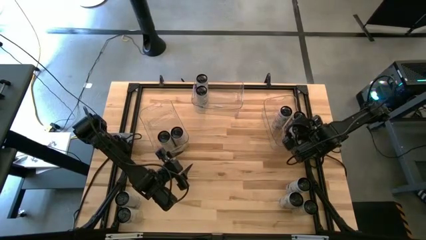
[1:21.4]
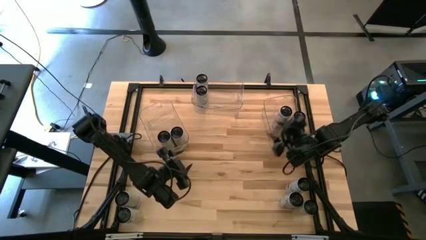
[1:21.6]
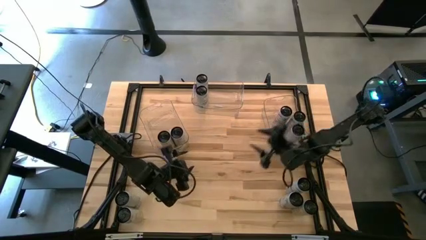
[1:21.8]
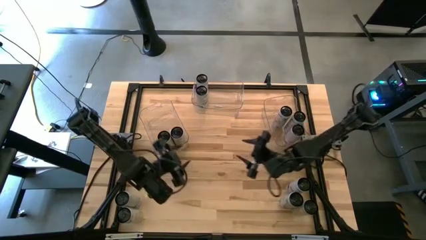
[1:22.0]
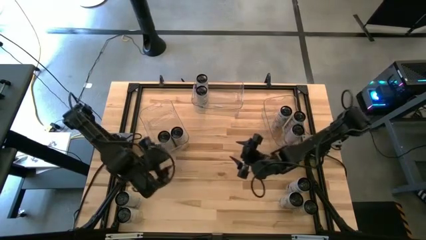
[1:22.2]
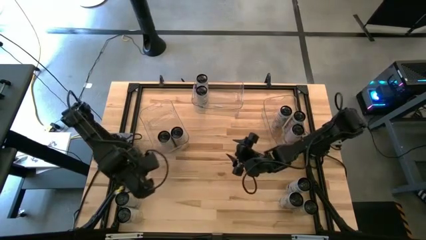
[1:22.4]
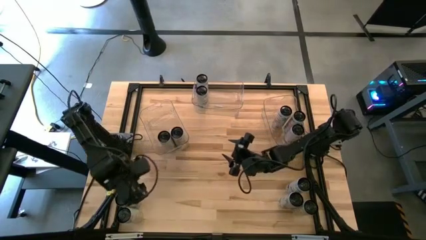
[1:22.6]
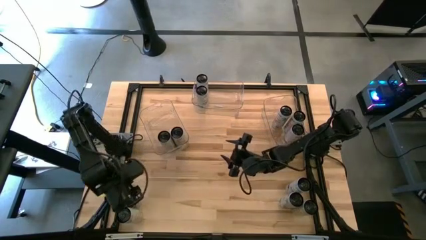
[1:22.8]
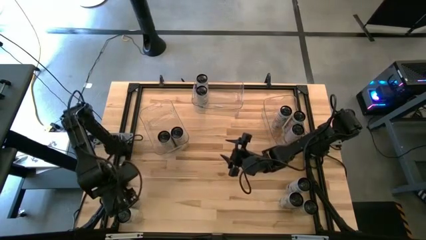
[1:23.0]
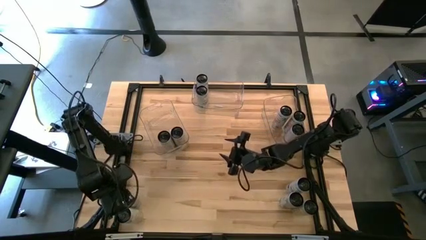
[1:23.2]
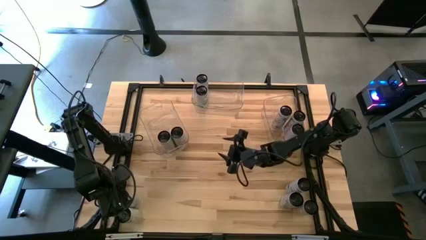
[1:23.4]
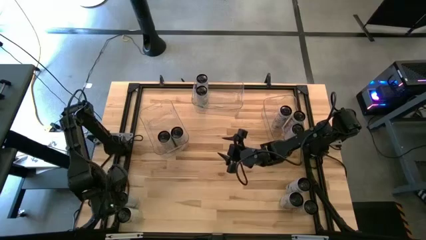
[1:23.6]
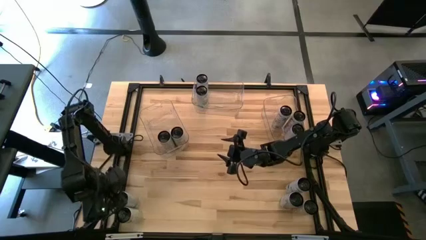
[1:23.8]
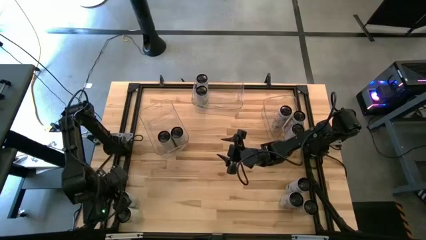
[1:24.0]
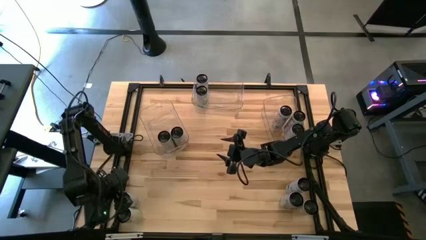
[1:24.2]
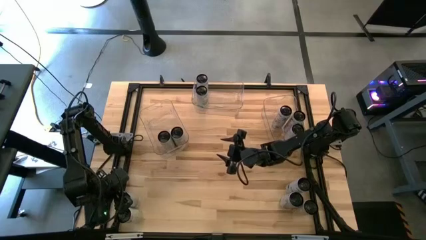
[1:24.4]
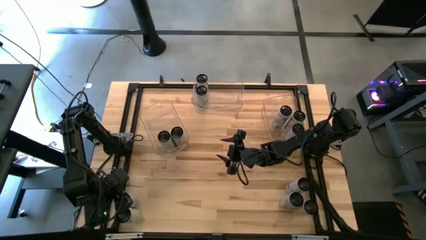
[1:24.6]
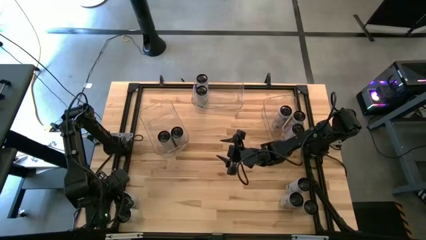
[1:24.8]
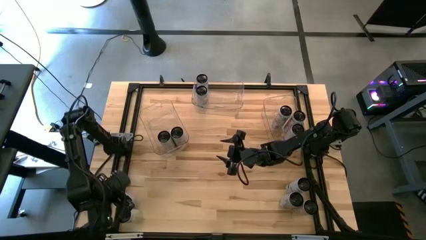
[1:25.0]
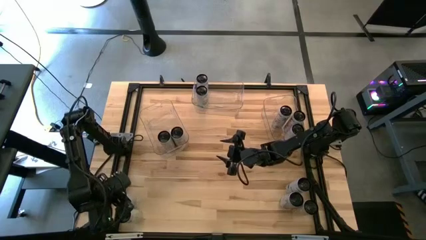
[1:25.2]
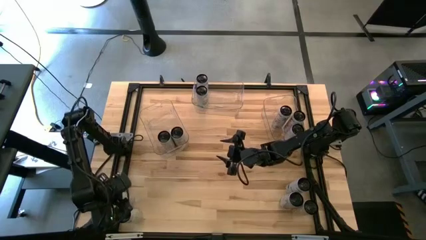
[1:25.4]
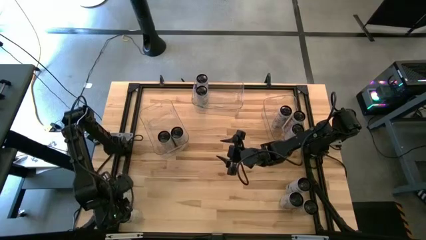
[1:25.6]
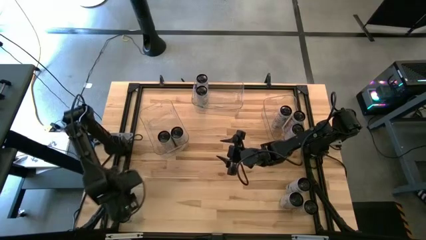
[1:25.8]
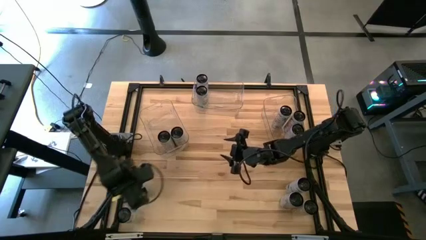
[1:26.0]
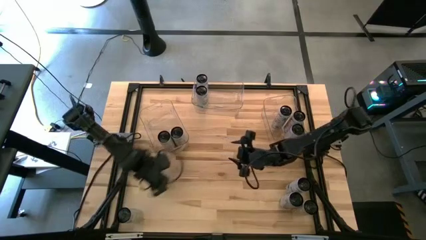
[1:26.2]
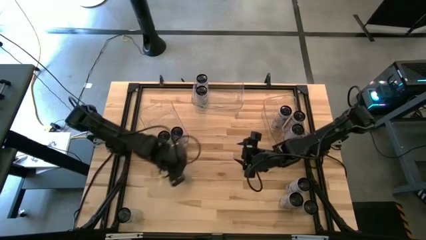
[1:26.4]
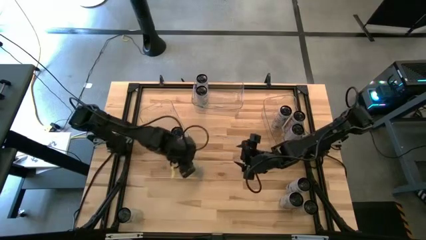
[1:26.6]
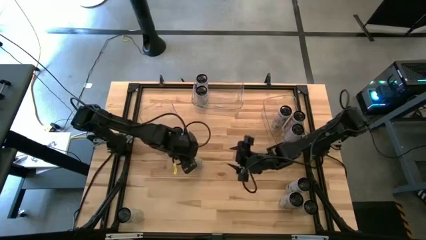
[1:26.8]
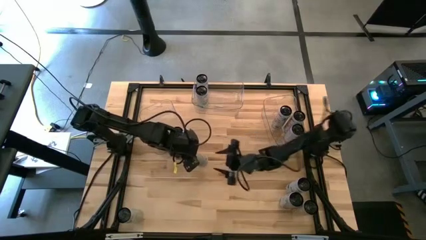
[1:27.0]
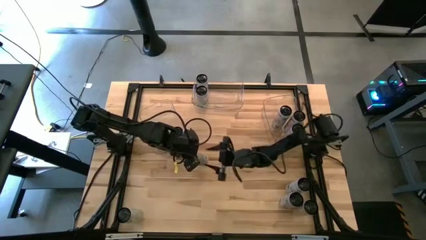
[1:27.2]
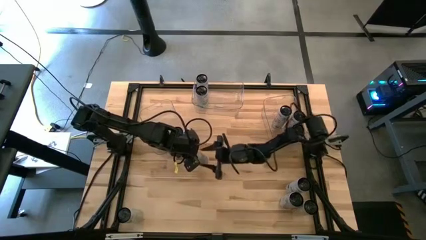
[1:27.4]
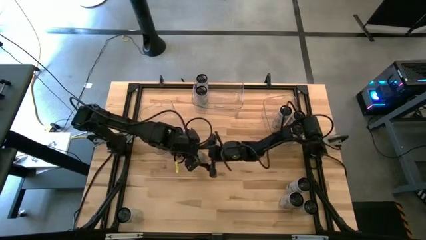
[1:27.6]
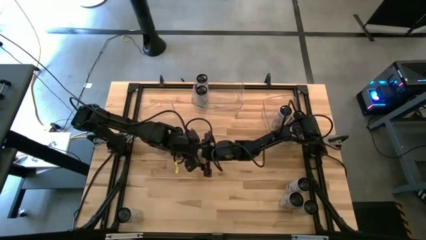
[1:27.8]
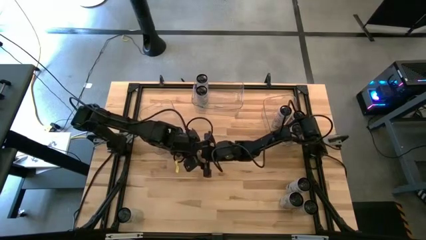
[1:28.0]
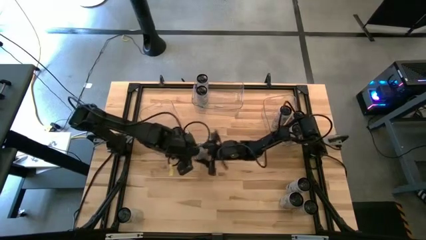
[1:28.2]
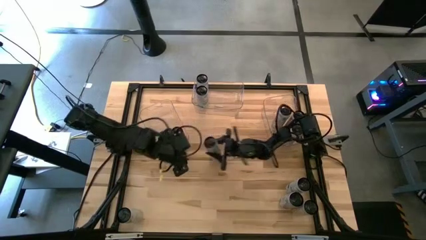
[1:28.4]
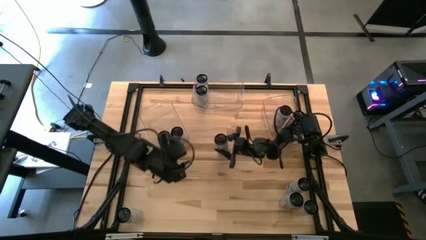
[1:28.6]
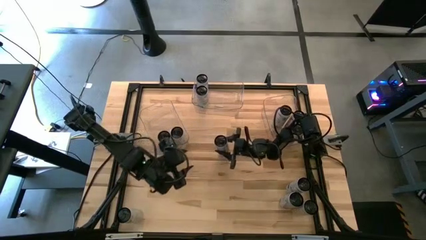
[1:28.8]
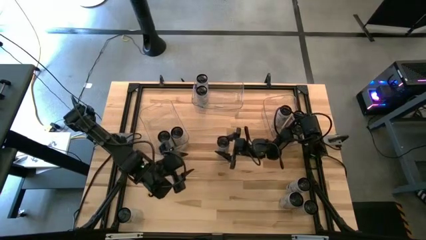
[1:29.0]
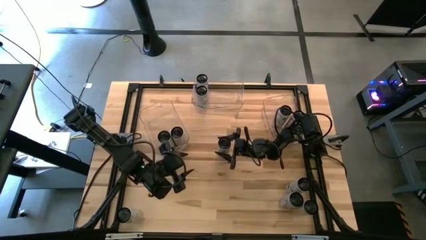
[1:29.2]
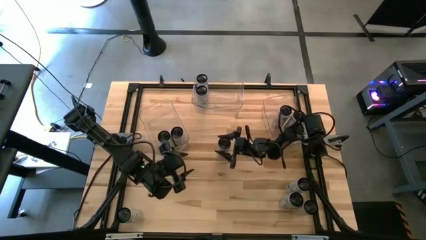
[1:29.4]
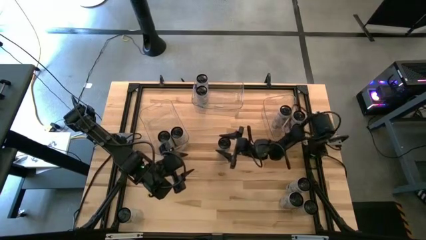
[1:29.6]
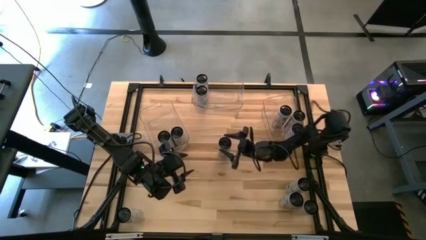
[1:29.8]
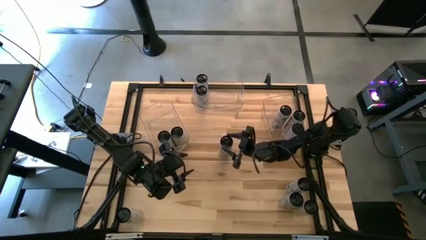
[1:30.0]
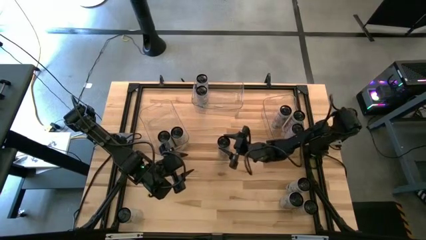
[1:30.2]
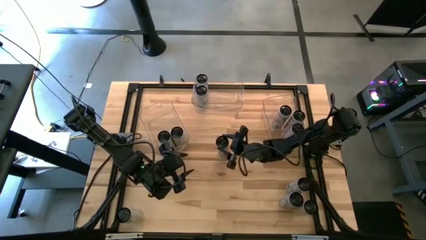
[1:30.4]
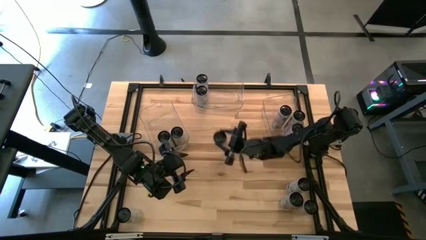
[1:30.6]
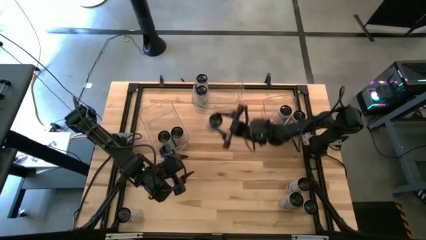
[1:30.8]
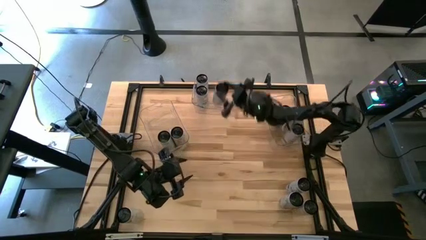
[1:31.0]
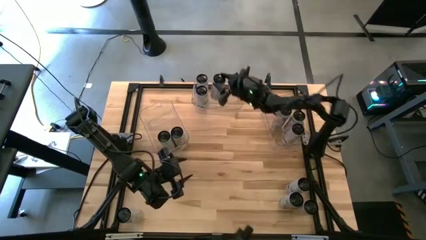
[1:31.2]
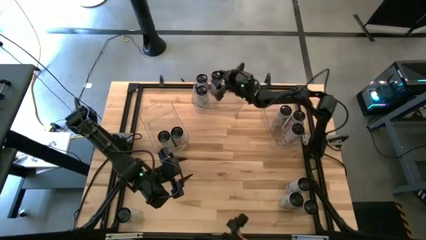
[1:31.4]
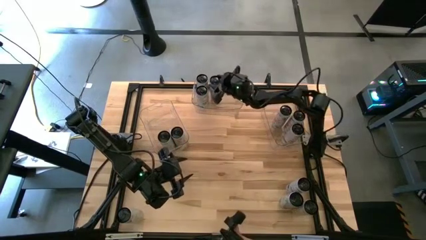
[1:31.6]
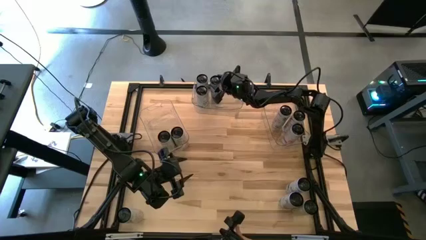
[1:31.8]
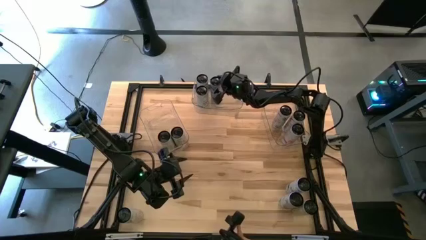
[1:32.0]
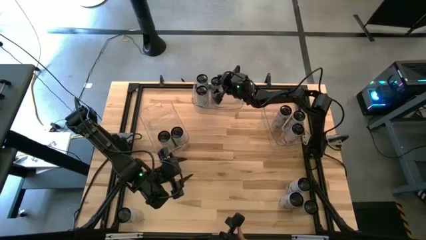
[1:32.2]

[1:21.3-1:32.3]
Task: Sort soda cans
Put the white and blue soda can into the middle transparent bin

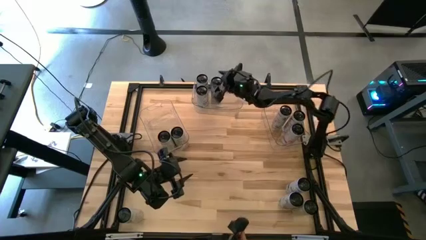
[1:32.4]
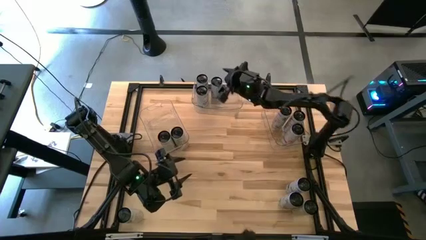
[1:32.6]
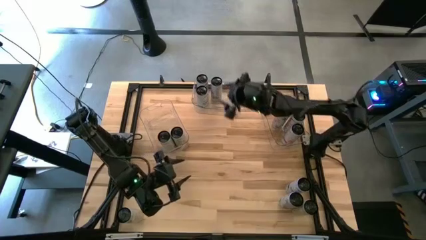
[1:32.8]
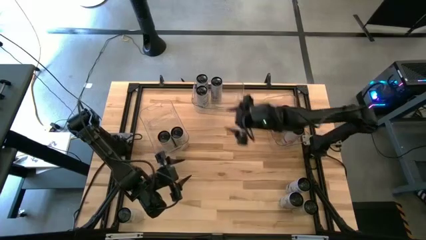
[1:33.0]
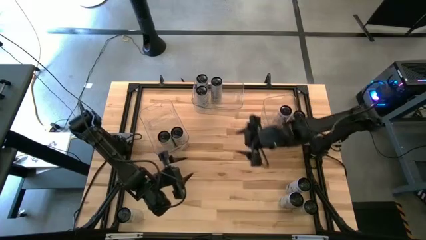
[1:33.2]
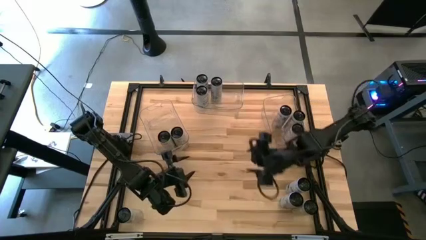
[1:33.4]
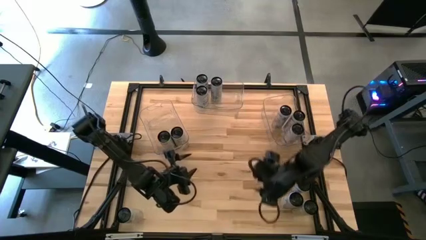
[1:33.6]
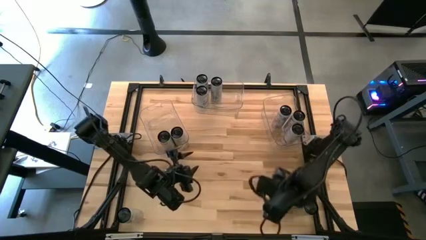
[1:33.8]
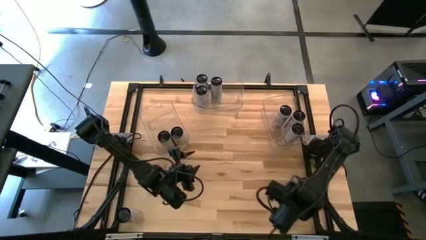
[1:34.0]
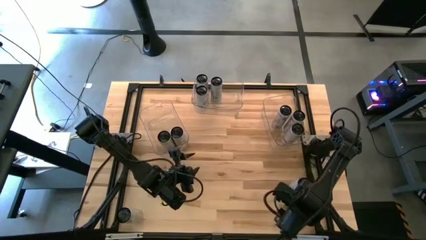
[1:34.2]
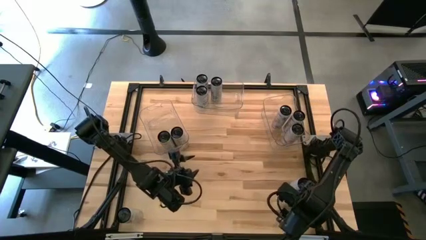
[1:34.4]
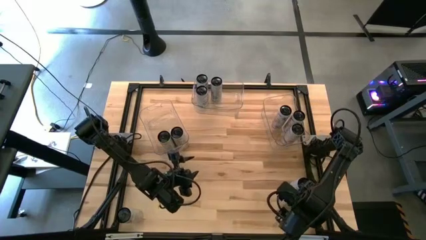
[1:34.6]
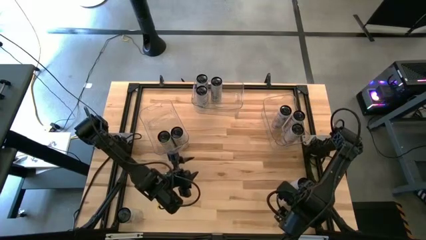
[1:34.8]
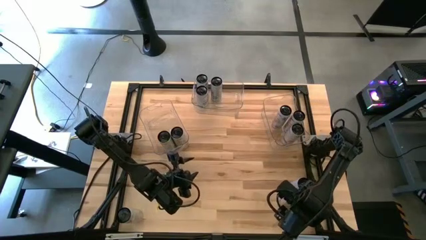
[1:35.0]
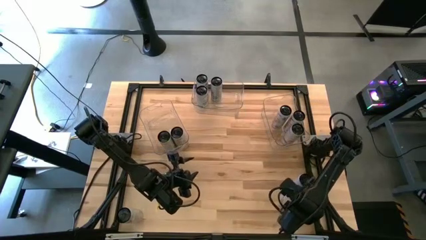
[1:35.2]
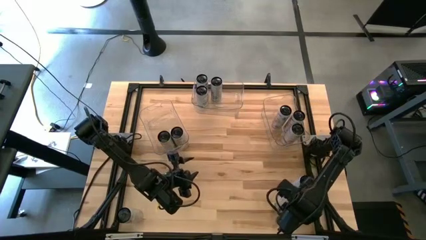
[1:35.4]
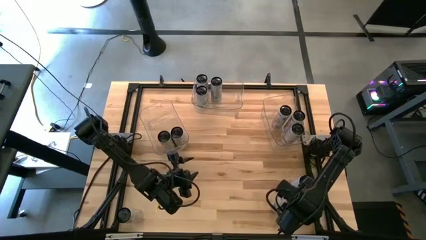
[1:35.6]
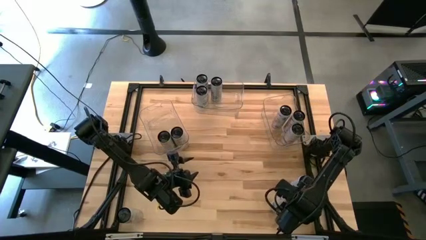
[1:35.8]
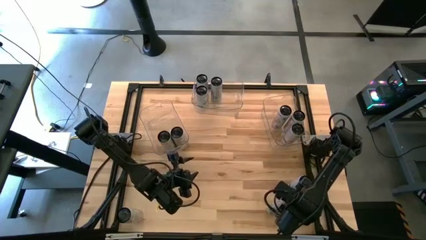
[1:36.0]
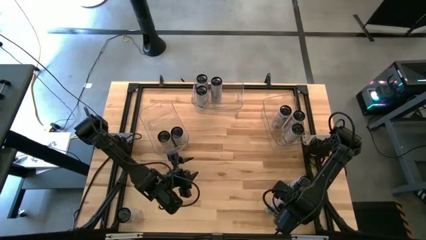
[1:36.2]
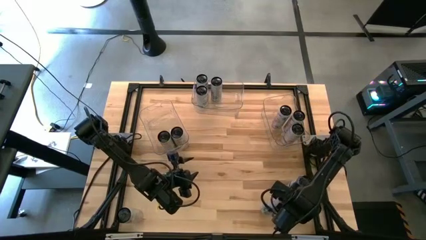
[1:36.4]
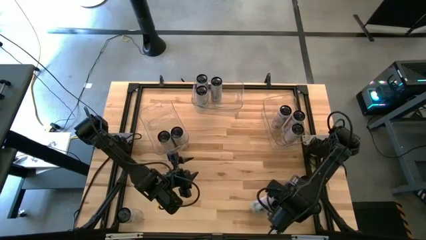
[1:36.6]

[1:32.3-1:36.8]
Put the white/pink soda can into the right transparent bin
